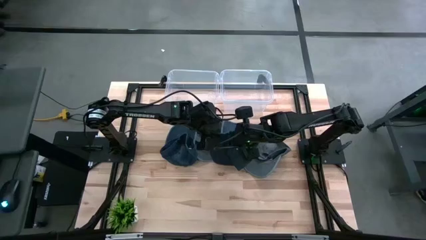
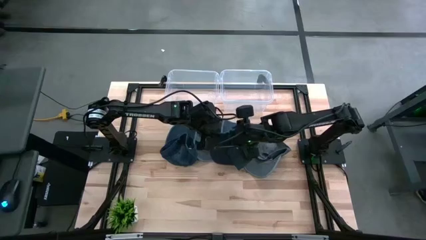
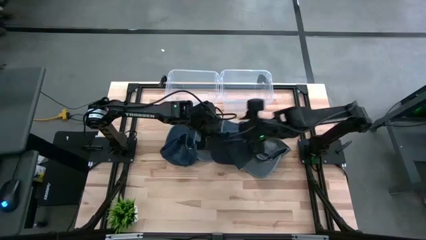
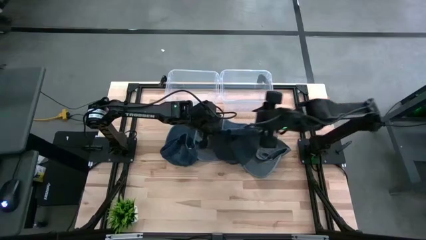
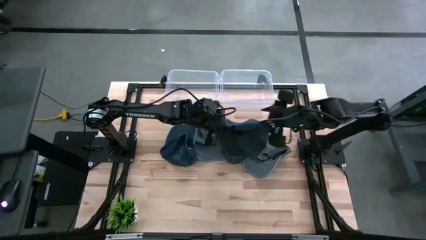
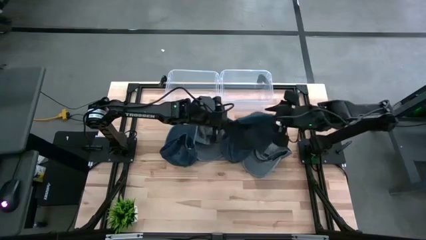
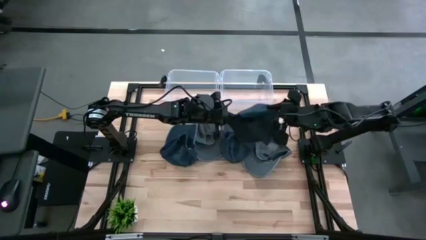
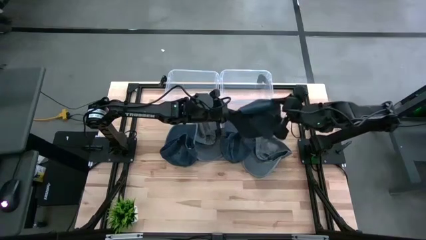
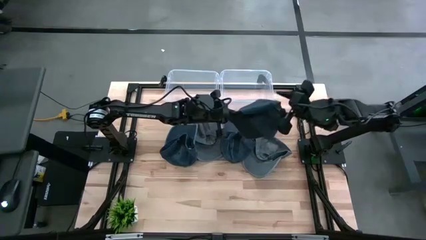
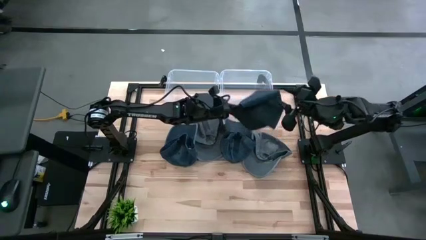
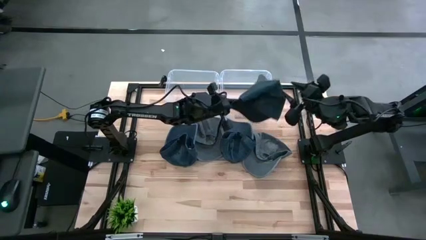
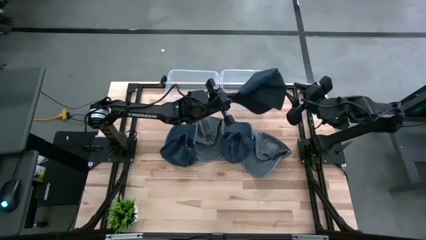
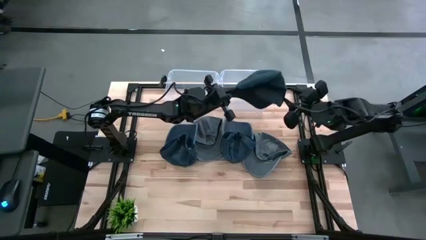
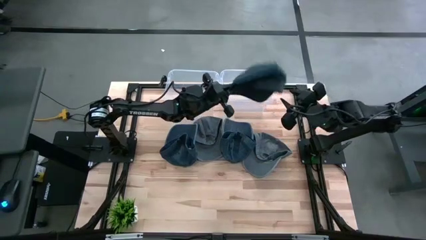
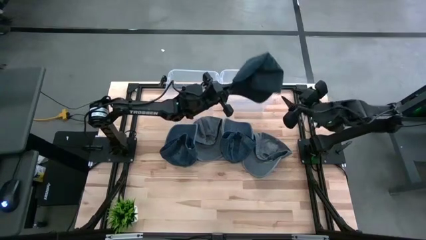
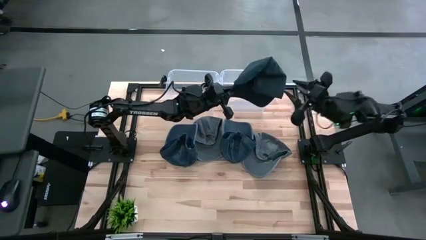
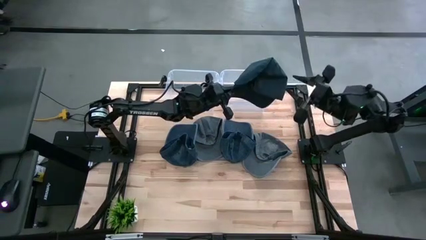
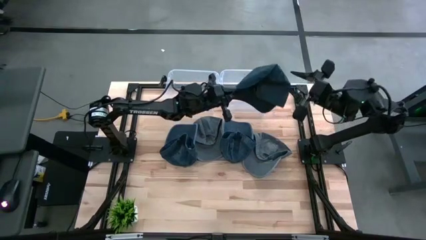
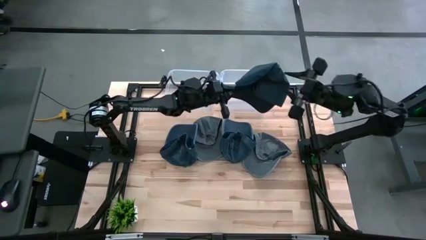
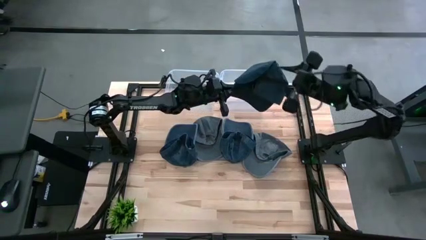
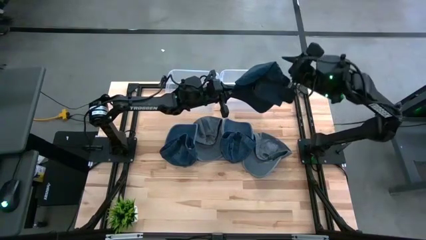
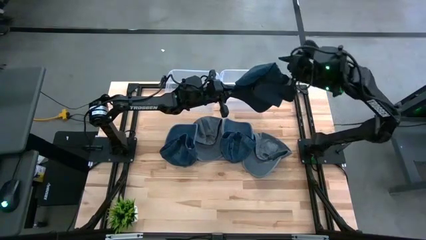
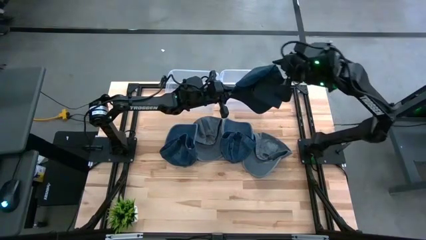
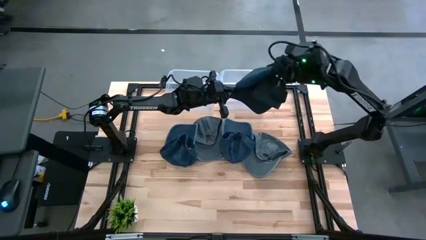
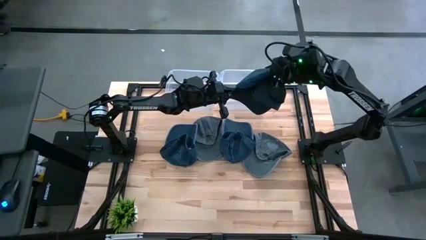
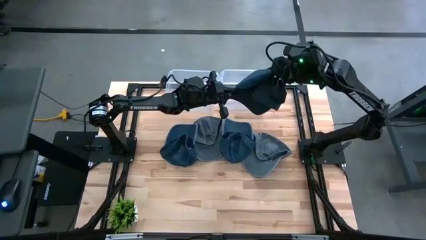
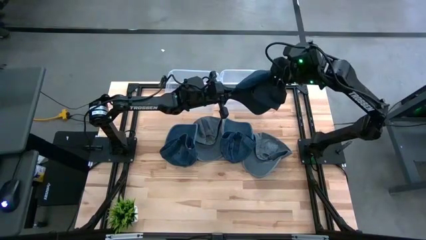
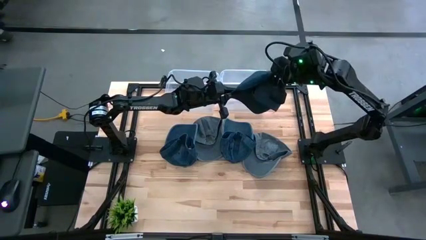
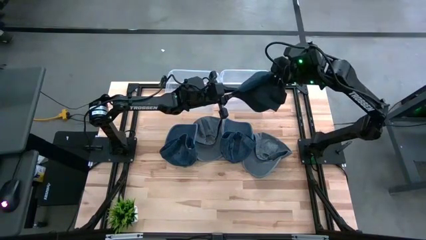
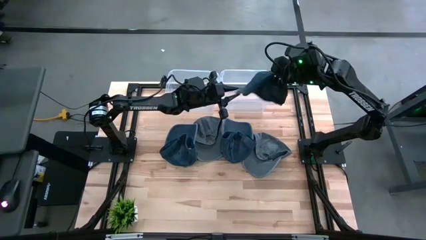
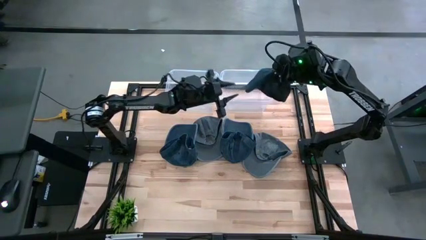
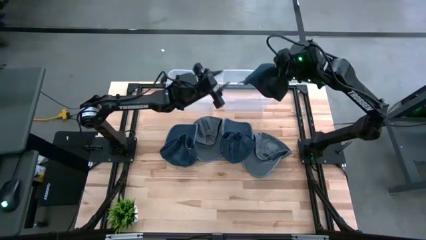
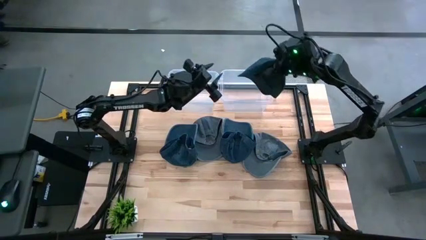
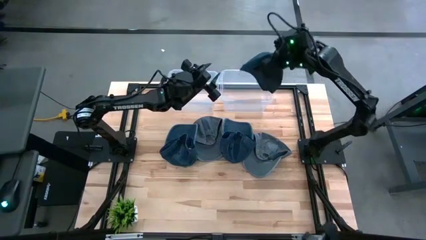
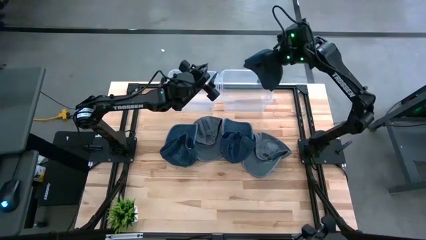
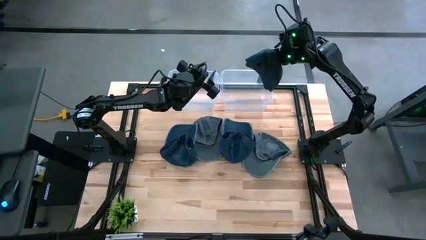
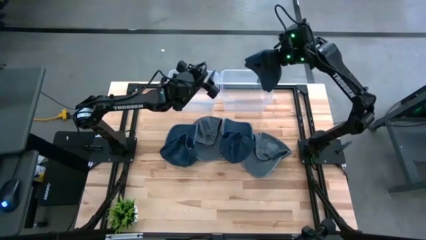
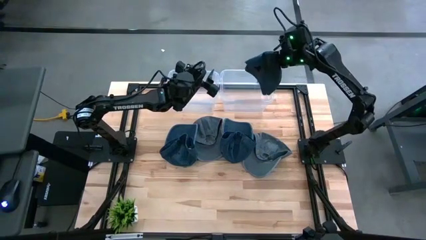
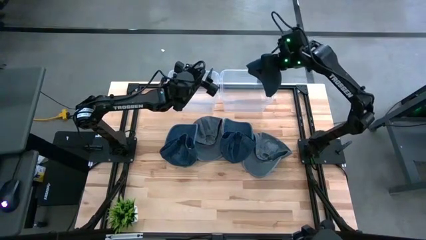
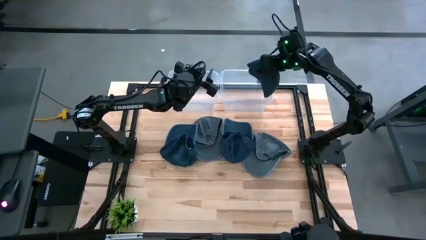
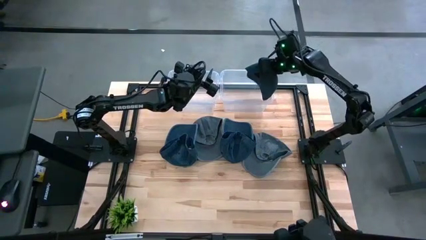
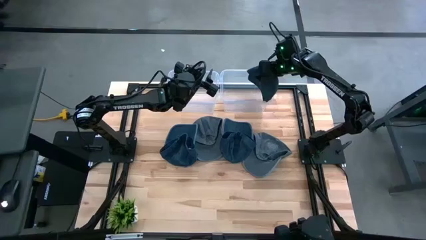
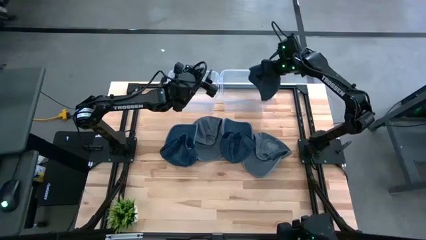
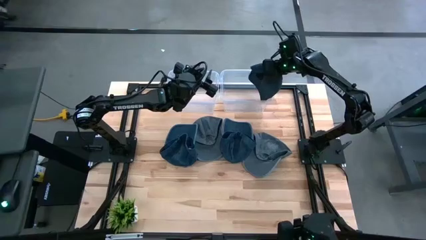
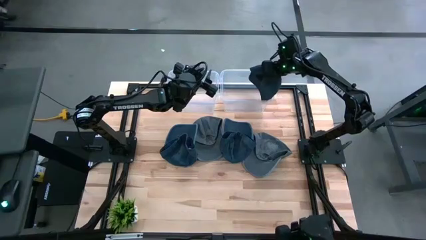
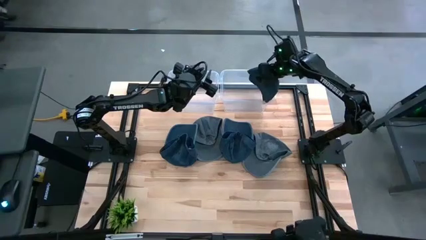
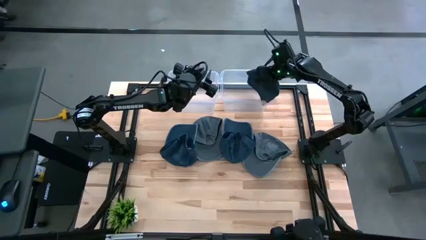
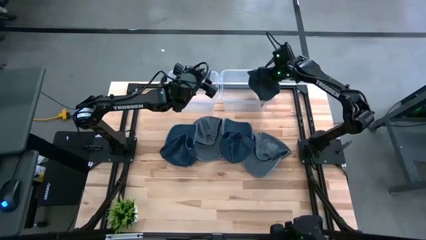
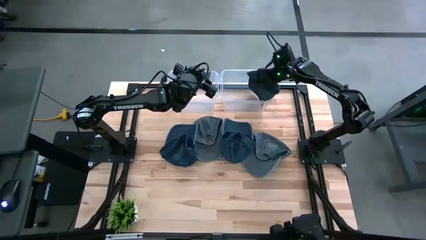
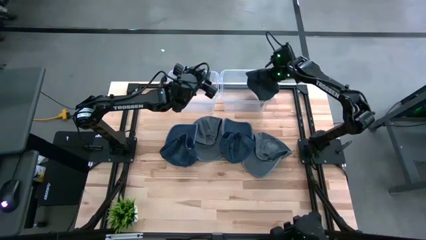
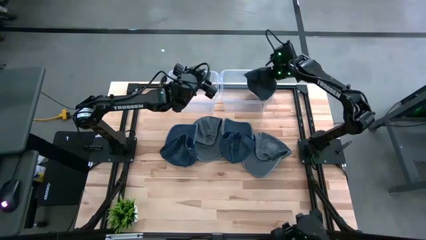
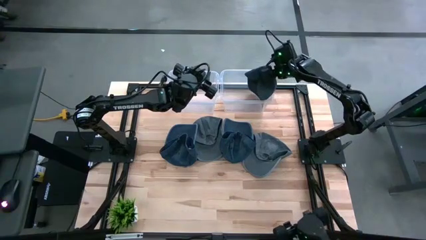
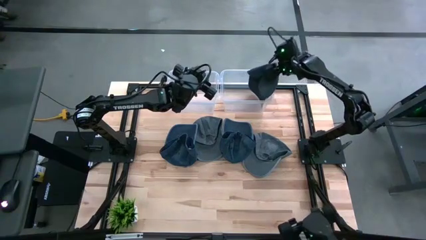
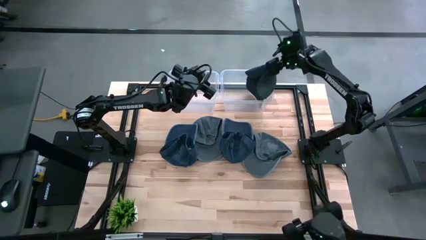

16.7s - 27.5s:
Task: Pick & Place hat
Put the bottom blue cap into the right transparent bin

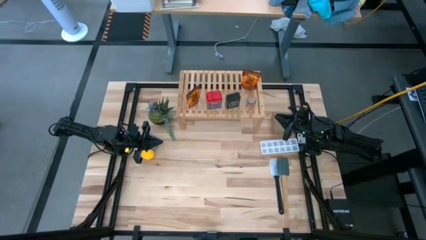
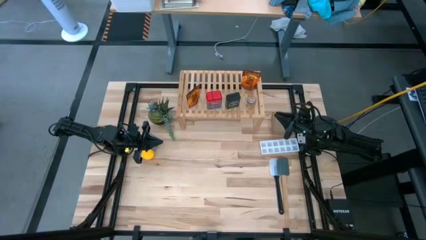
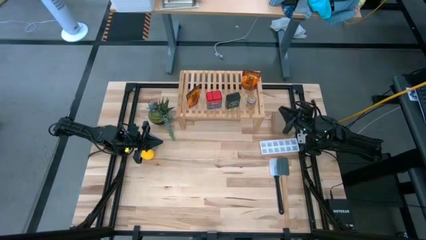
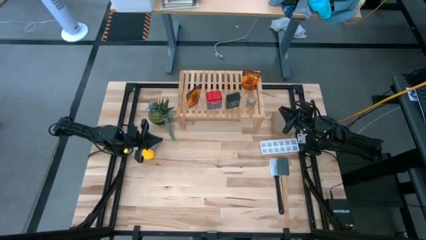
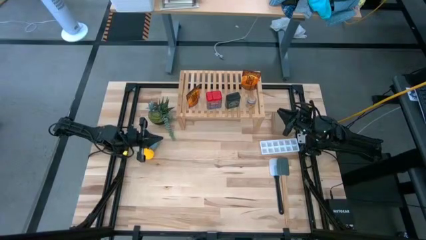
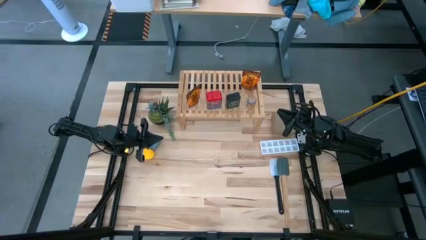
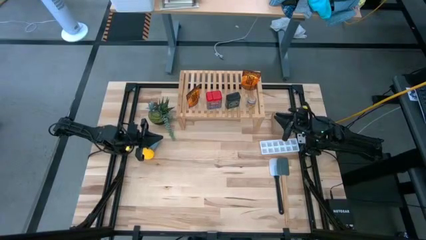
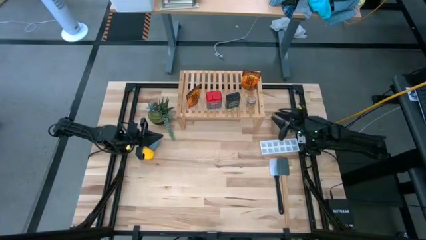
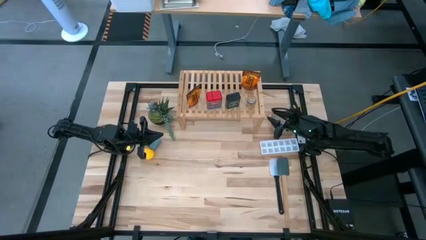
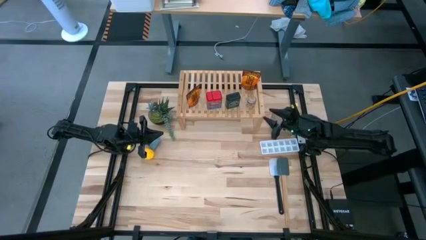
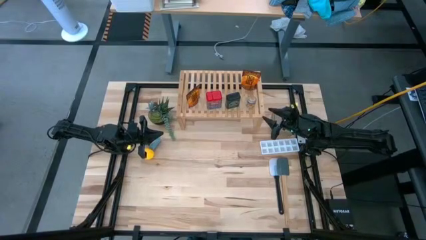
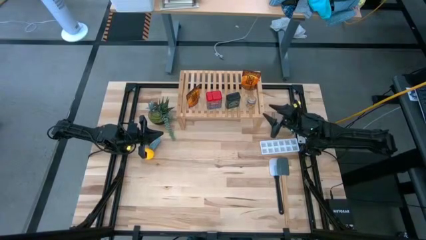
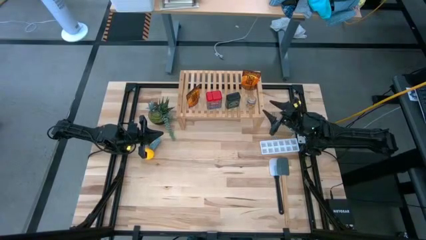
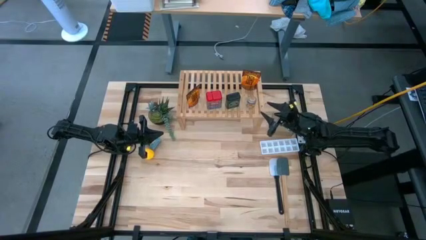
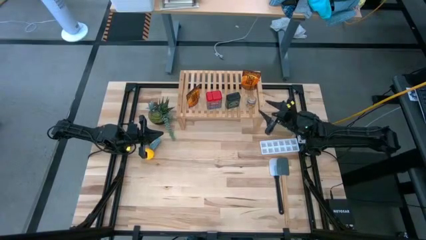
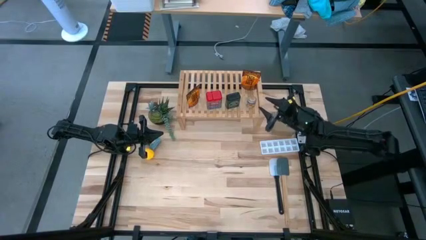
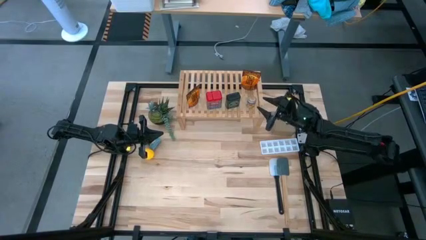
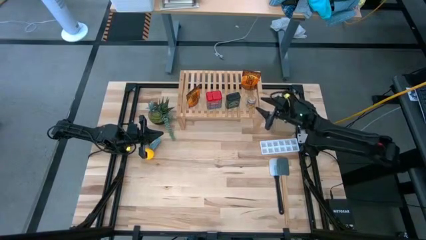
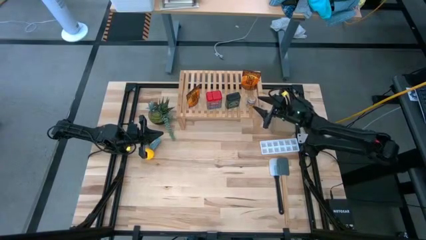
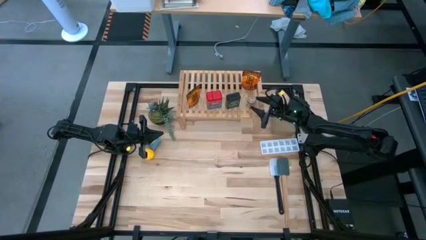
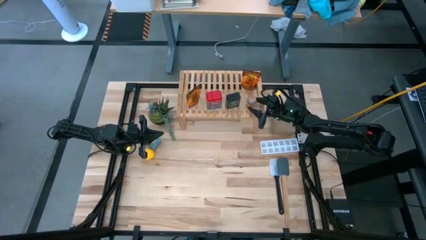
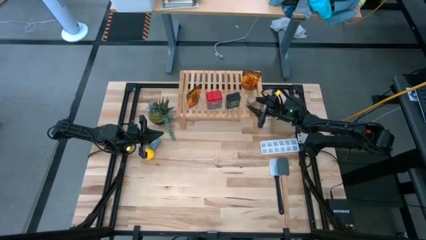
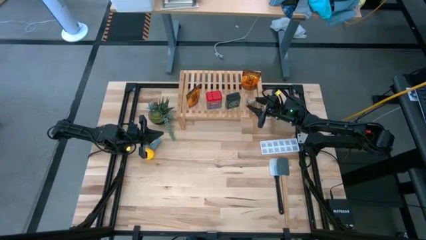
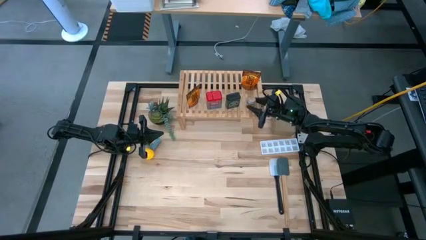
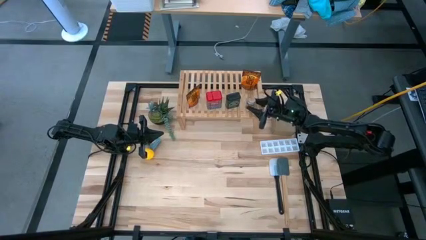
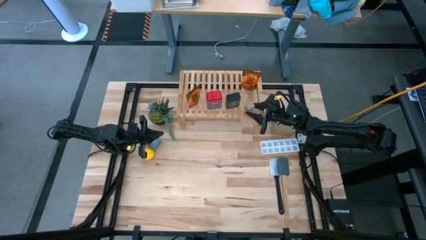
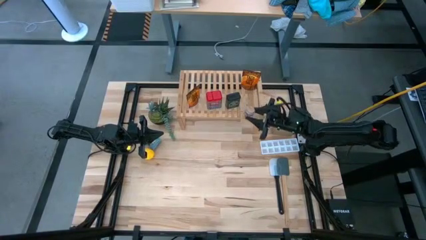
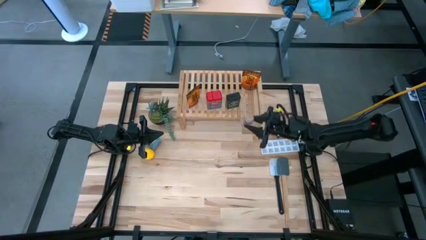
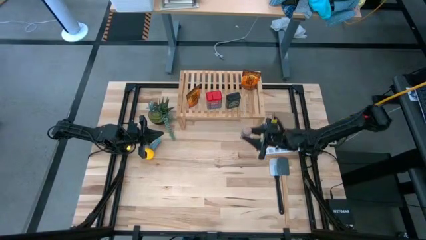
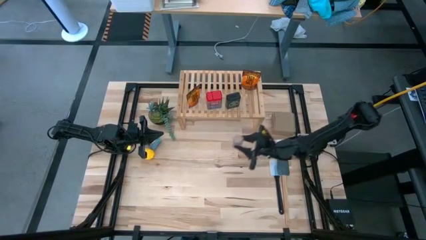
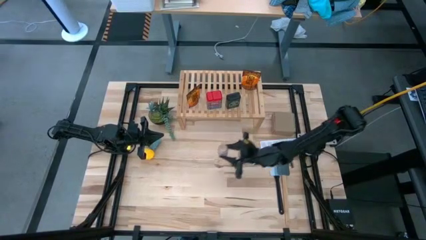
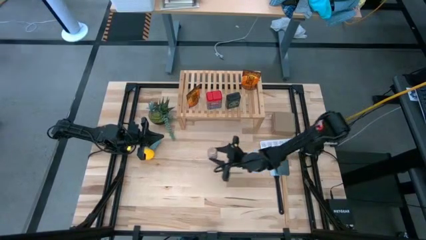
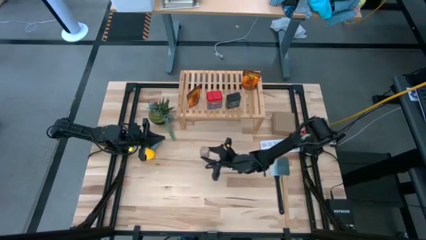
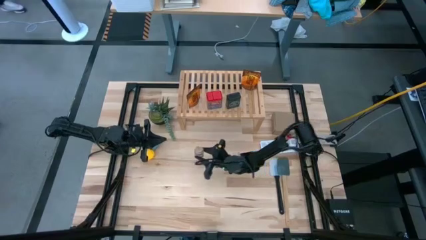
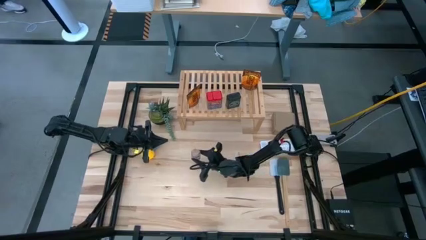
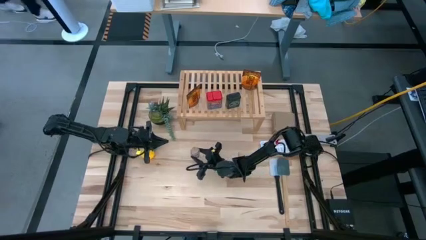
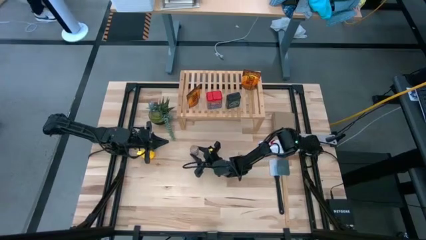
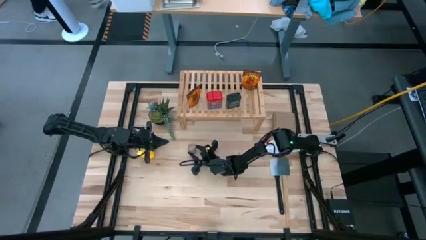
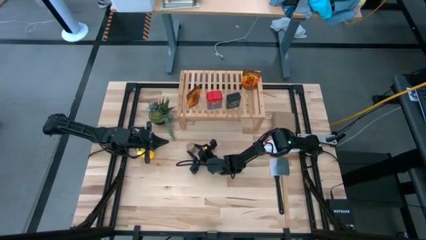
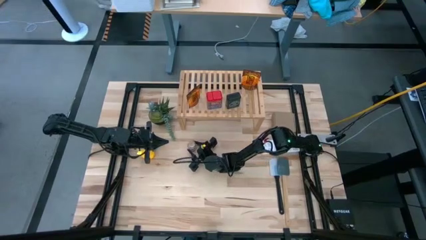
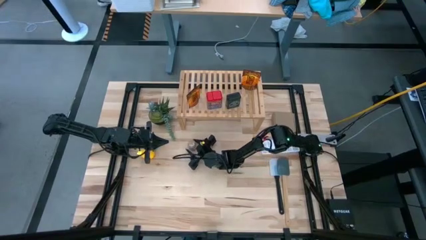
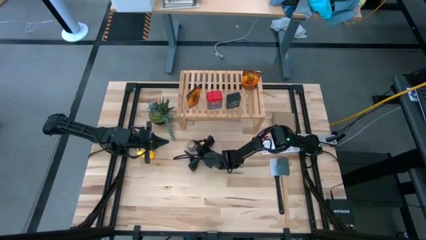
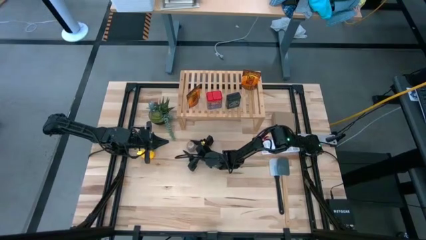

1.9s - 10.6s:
Task: Shelf spices
Remove the brown seasoning bottle from the shelf
